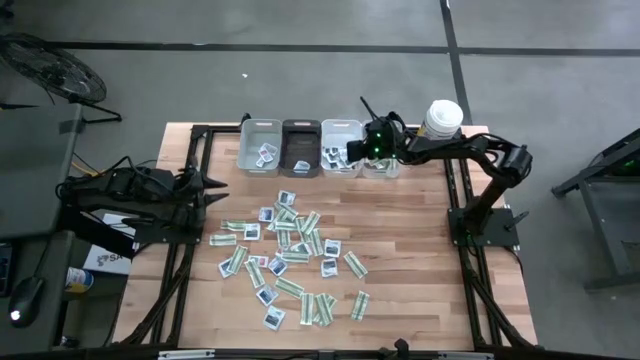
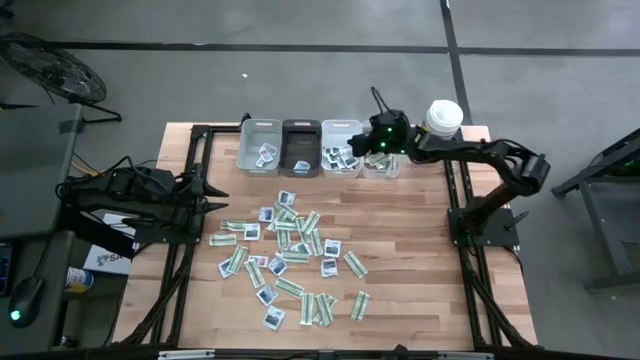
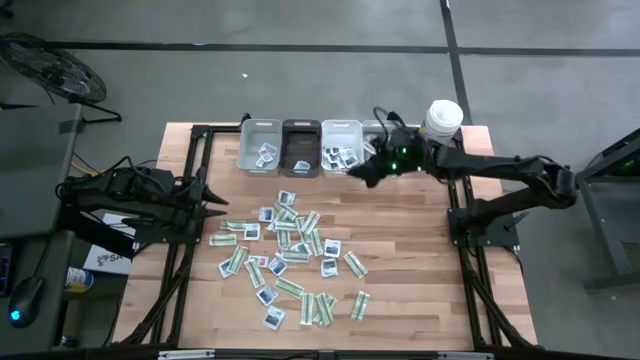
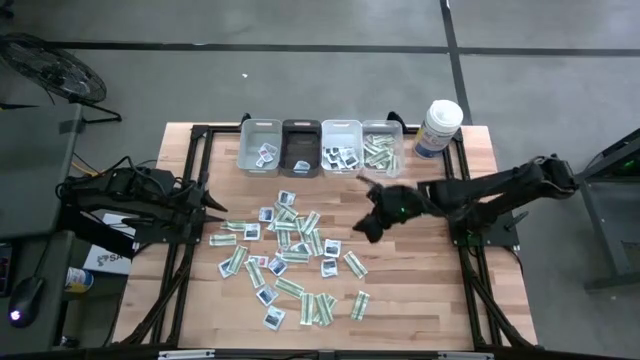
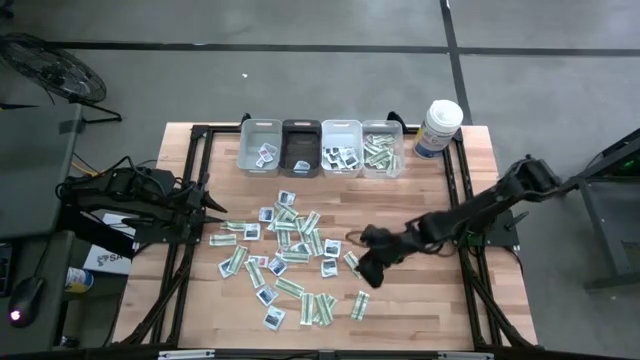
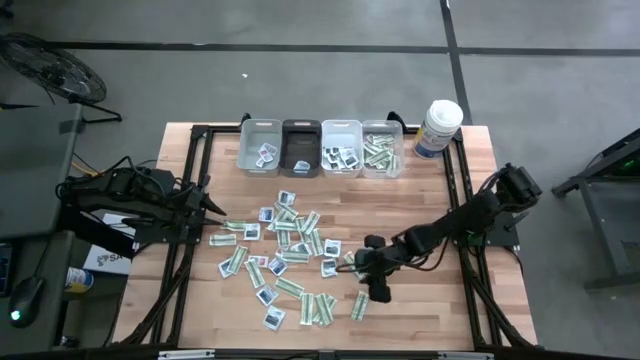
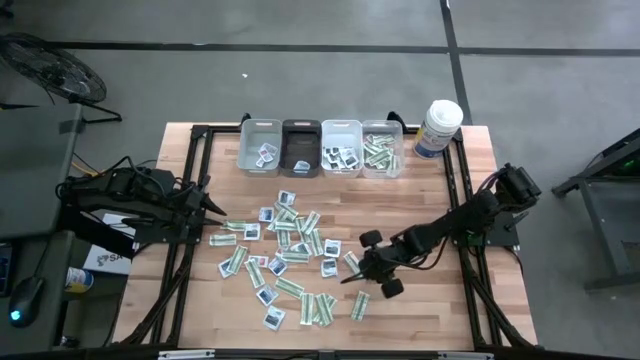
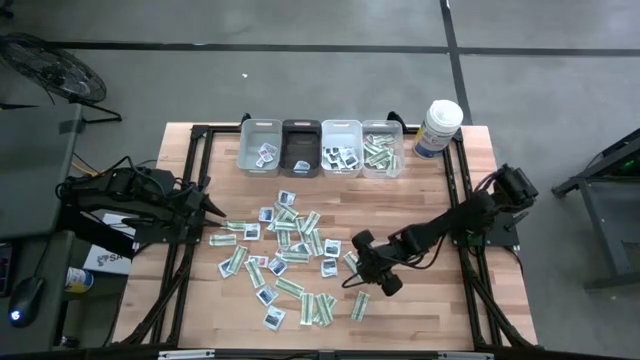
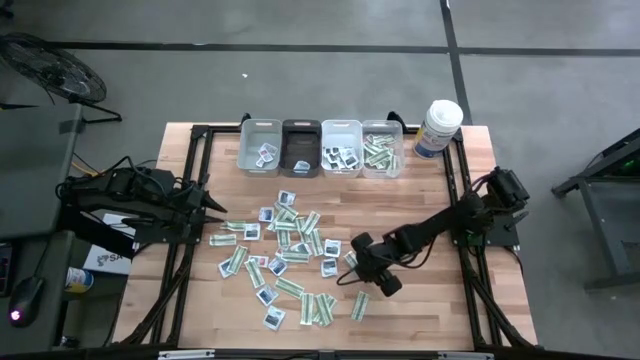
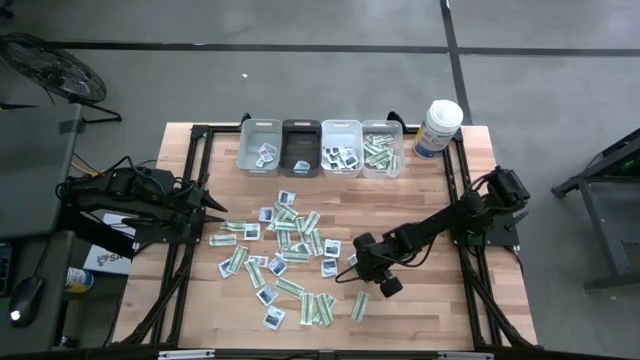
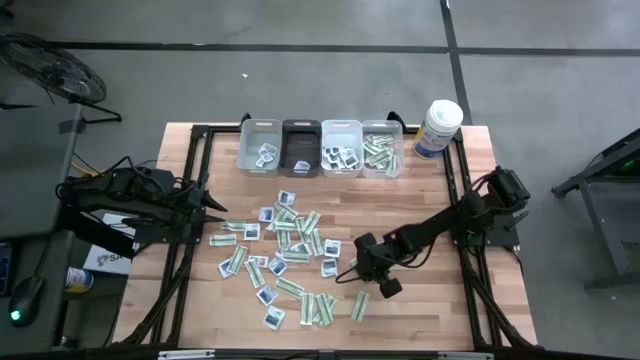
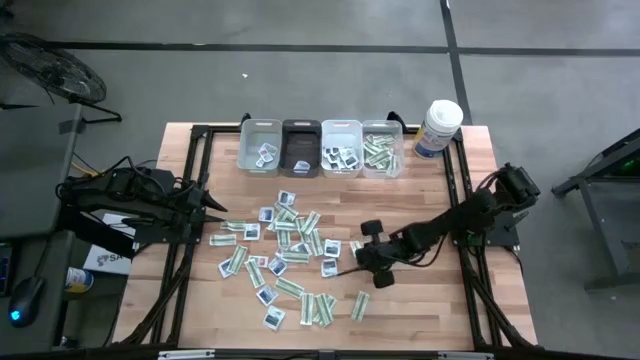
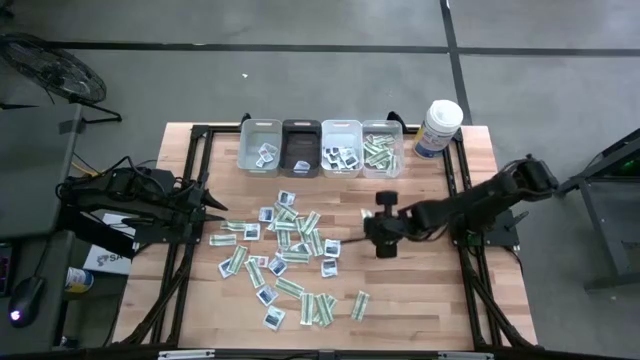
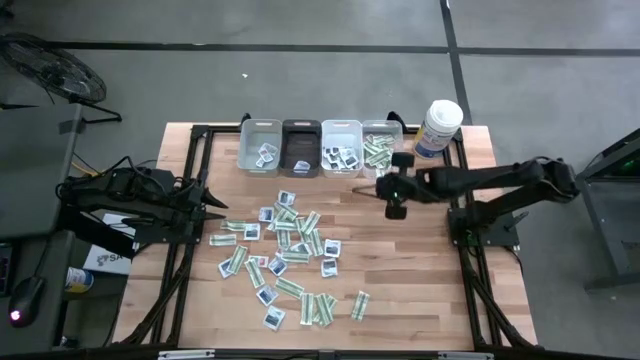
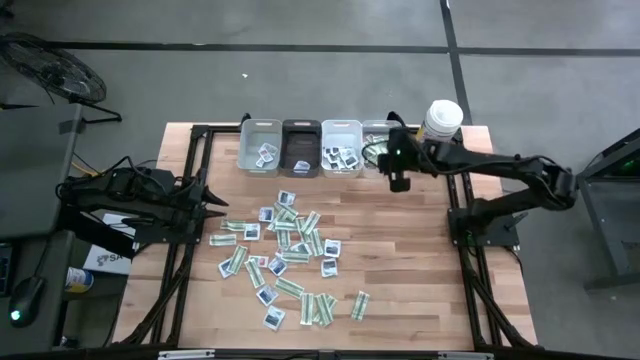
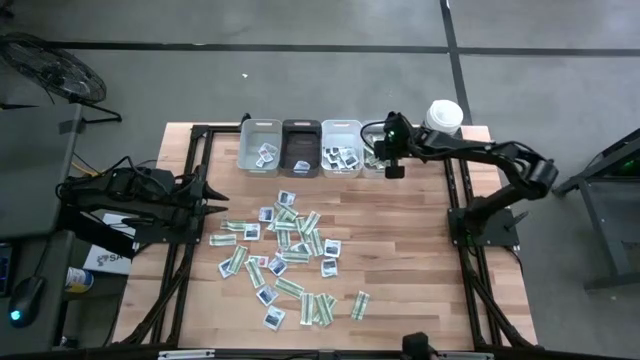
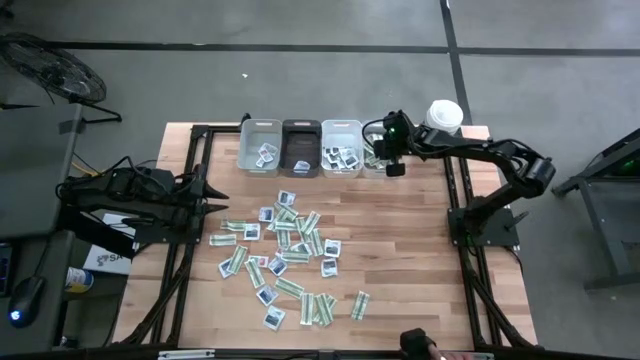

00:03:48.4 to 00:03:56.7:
Task: Pick & Place First Aid Supplies
Put the green bandage into the transparent bin

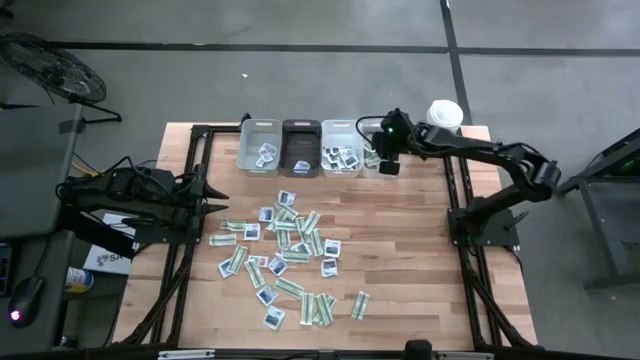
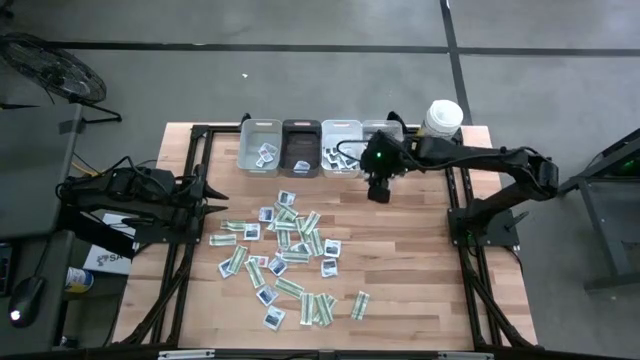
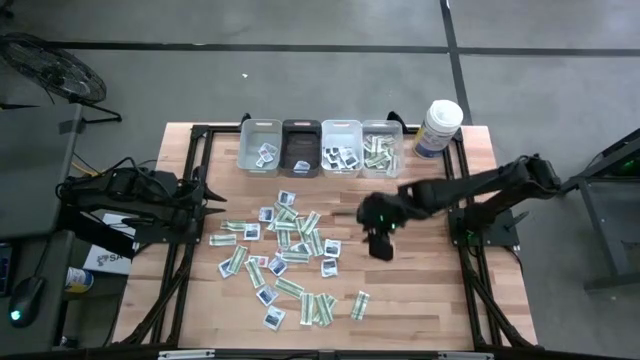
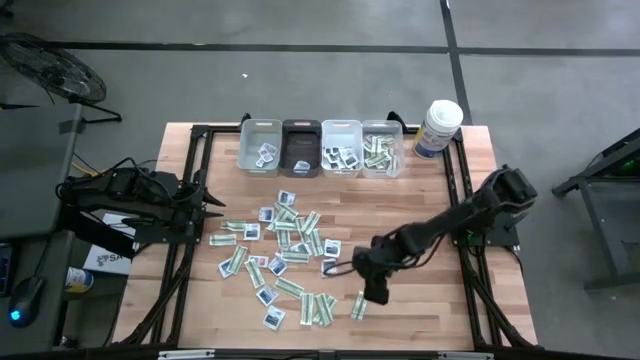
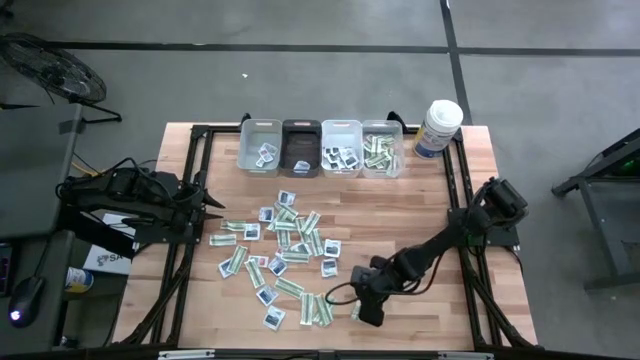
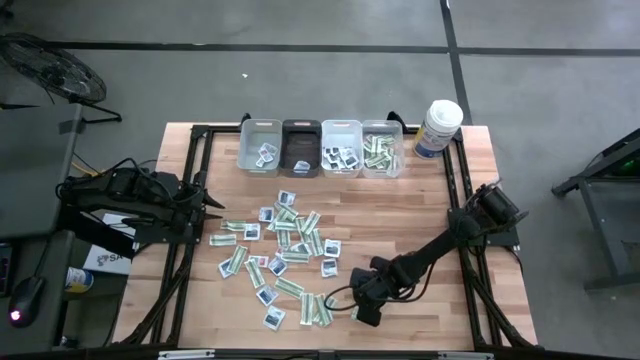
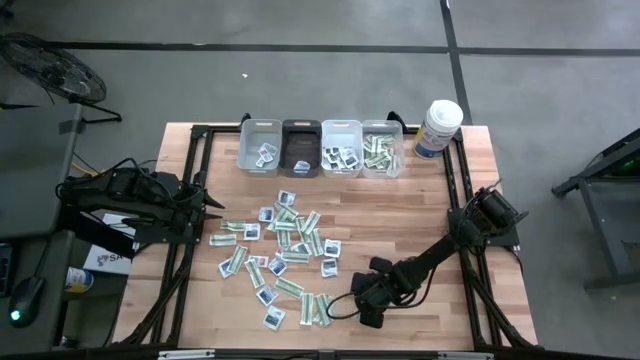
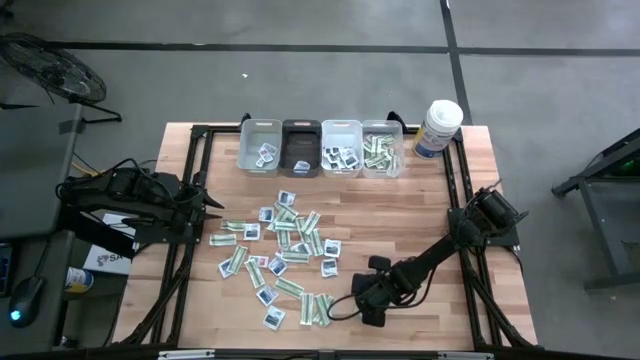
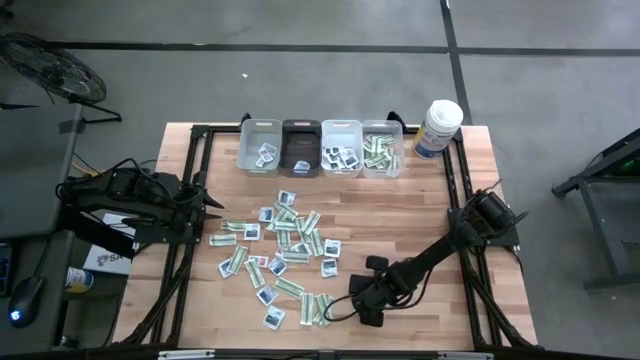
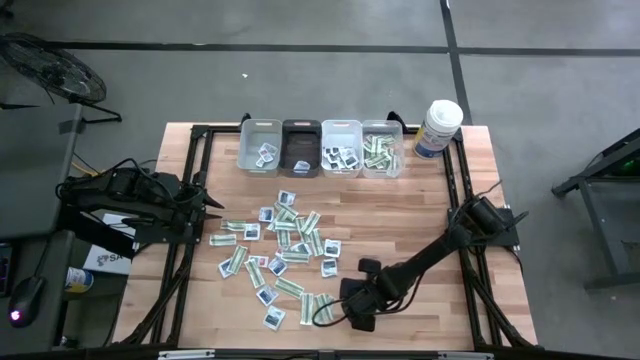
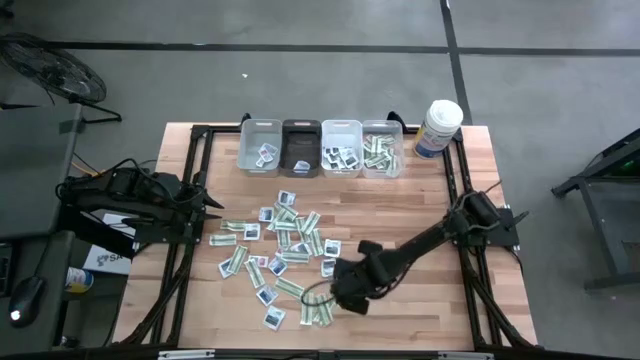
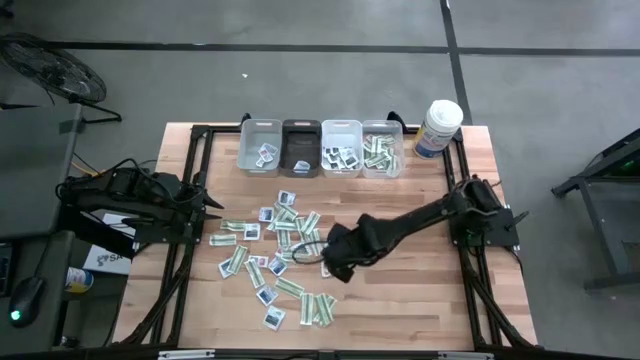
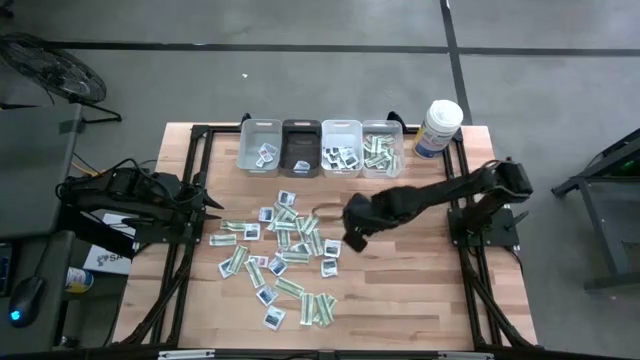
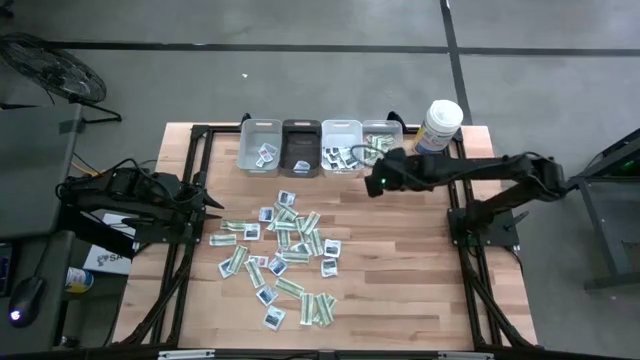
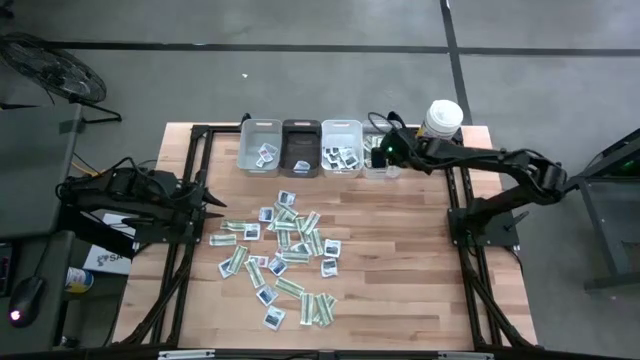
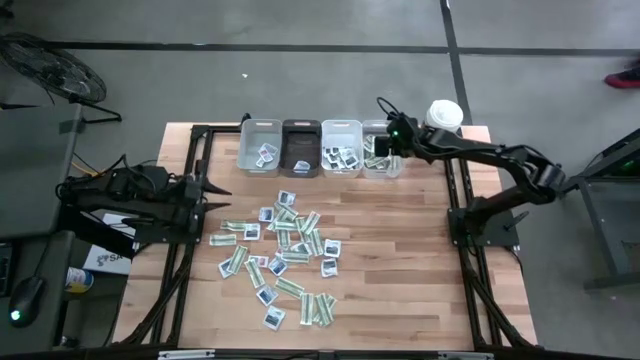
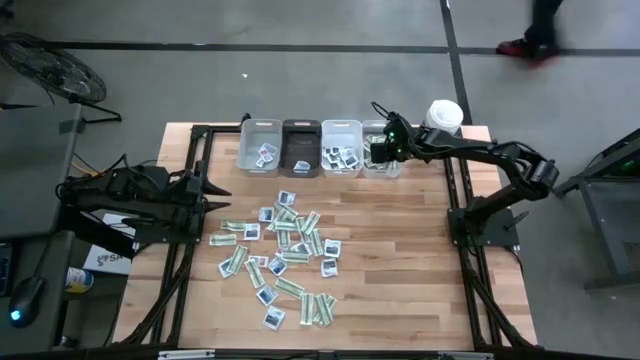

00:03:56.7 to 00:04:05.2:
Put the green bandage into the transparent bin

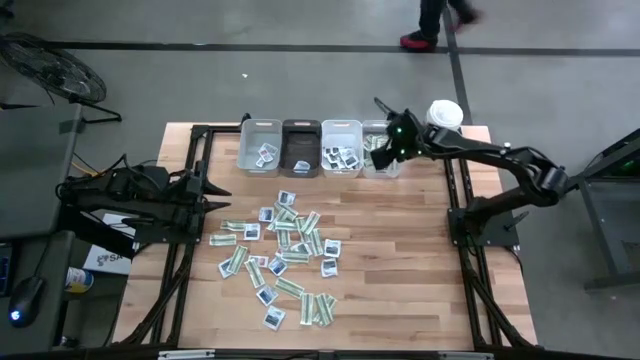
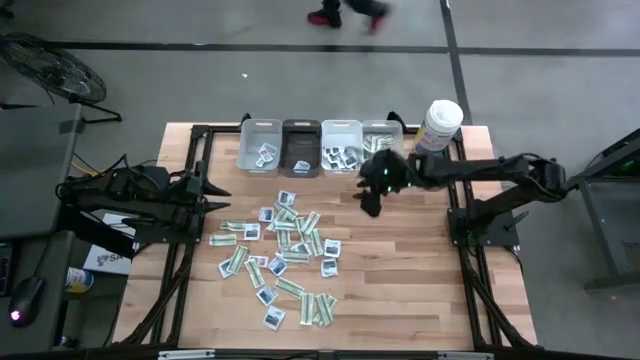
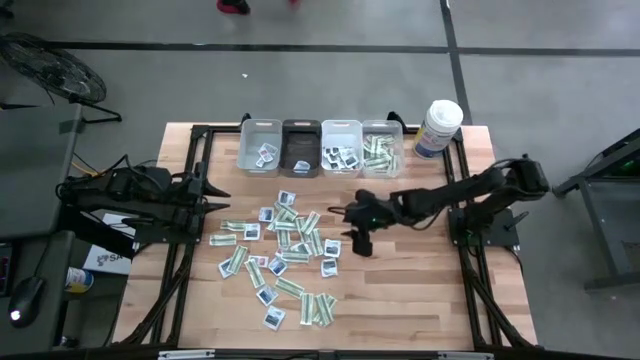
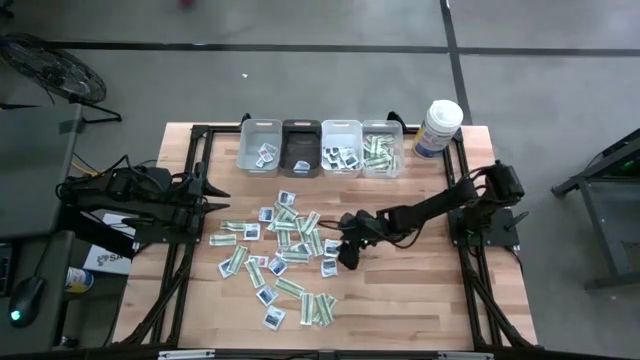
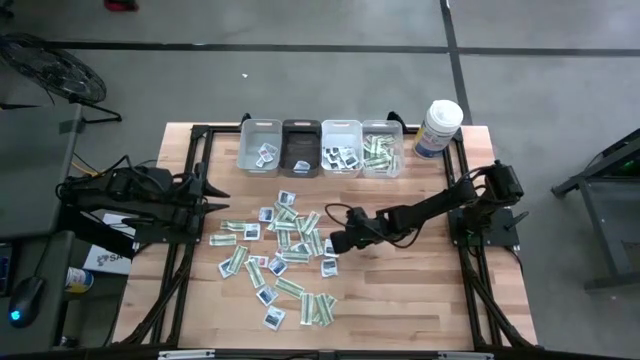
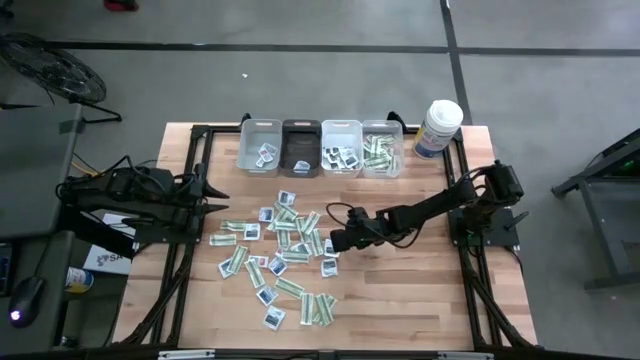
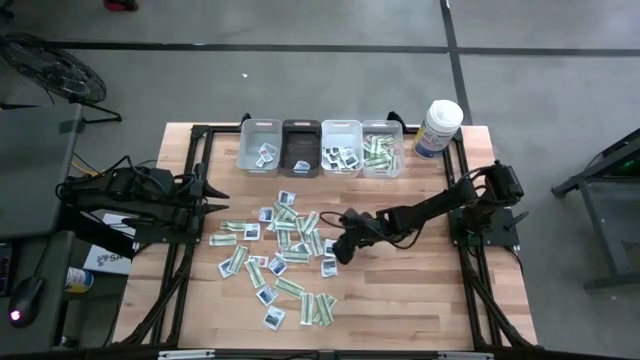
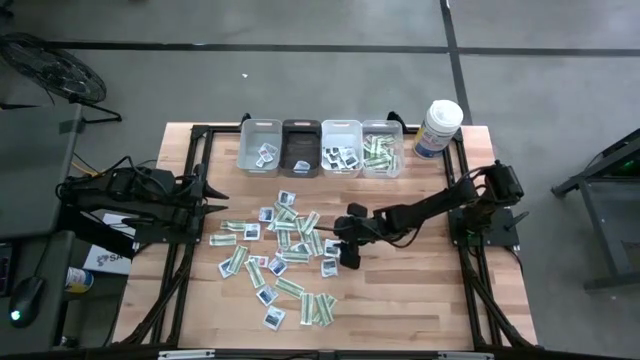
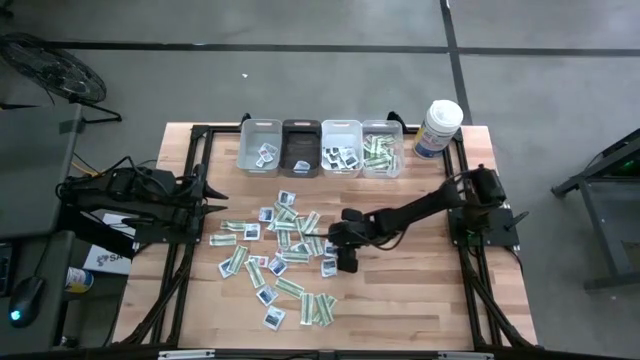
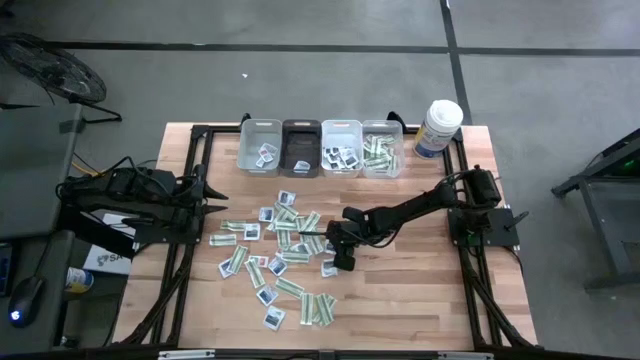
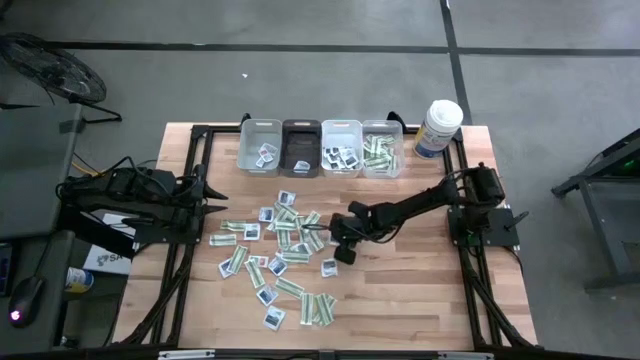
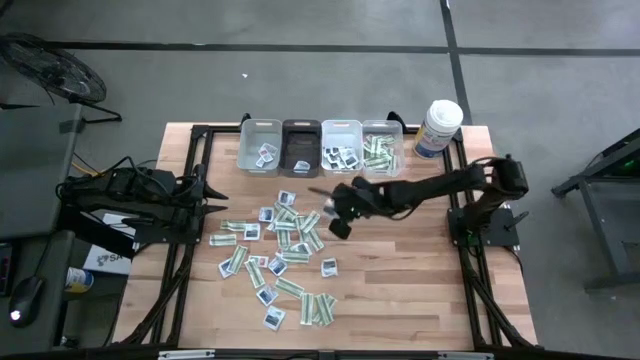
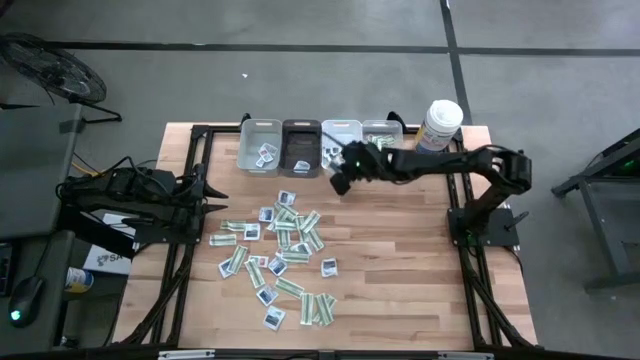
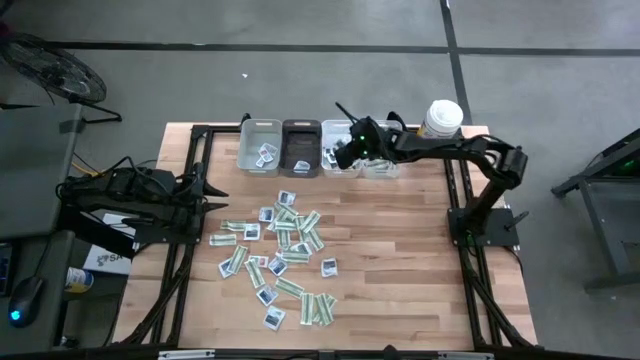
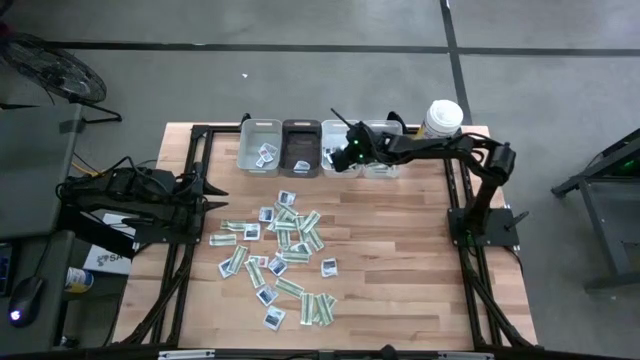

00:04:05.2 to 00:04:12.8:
Put the black towelette pack into the white bin
